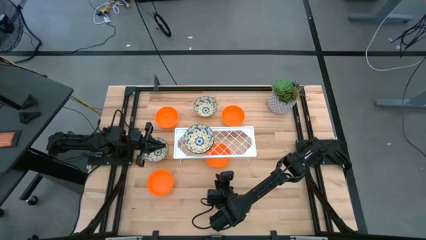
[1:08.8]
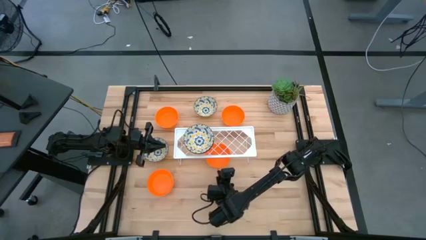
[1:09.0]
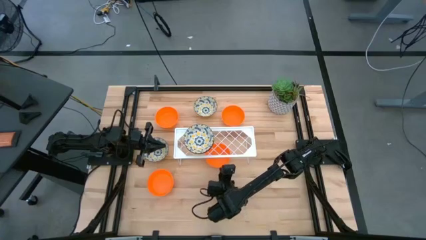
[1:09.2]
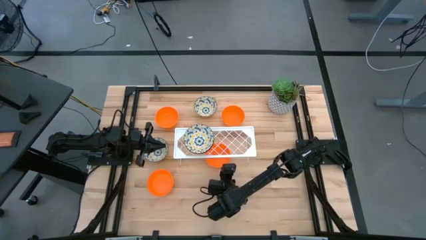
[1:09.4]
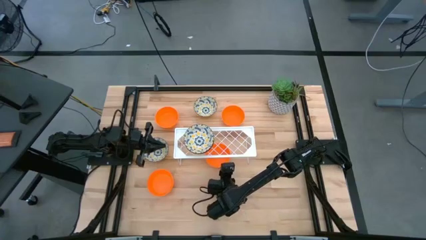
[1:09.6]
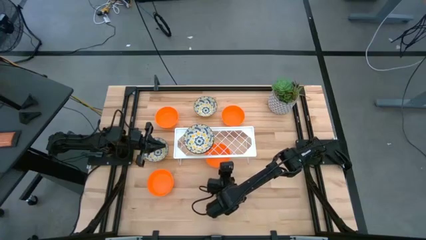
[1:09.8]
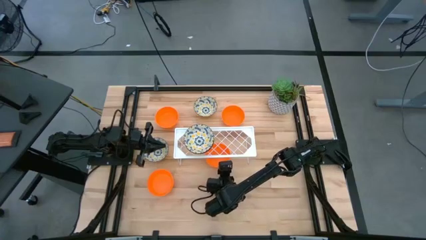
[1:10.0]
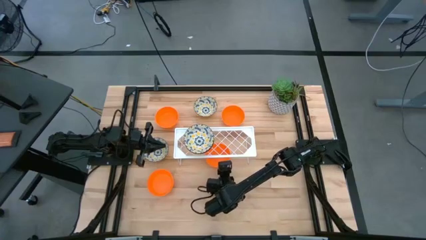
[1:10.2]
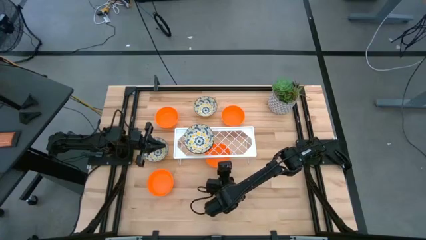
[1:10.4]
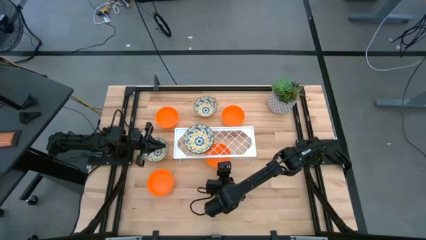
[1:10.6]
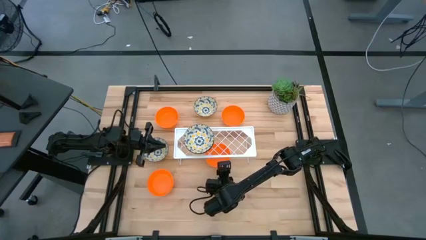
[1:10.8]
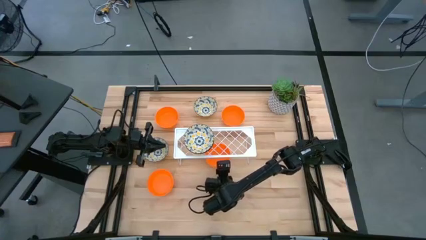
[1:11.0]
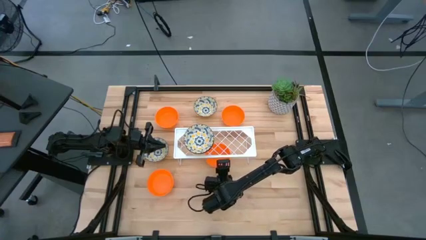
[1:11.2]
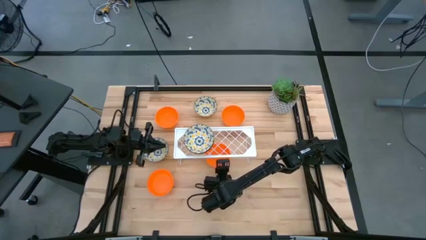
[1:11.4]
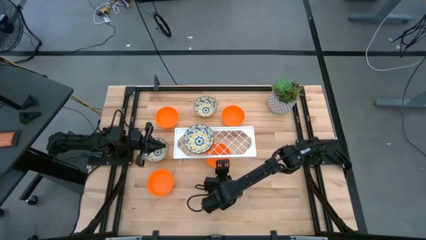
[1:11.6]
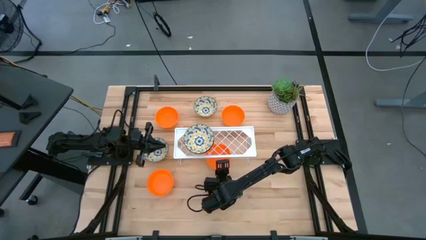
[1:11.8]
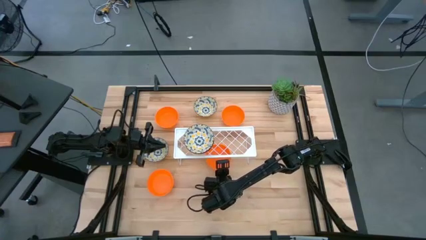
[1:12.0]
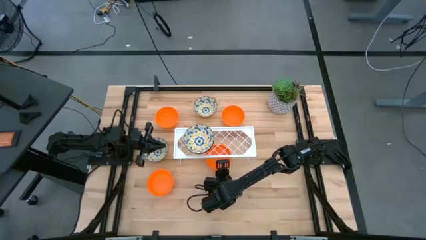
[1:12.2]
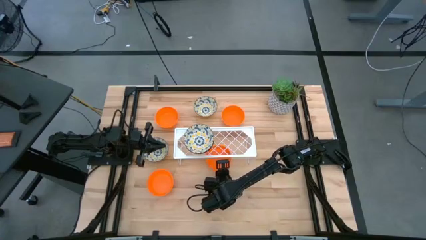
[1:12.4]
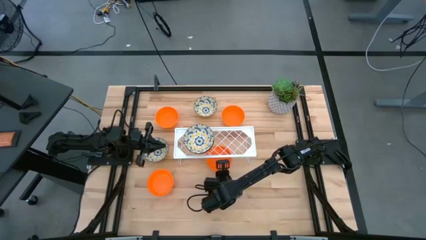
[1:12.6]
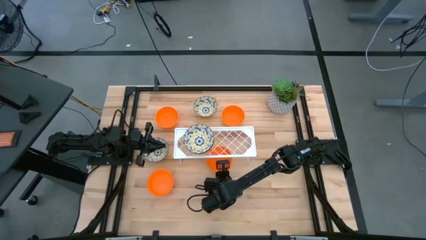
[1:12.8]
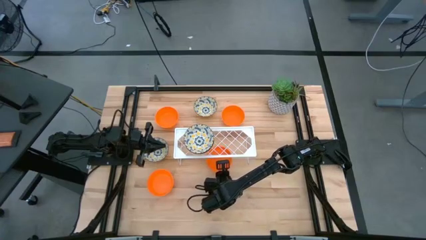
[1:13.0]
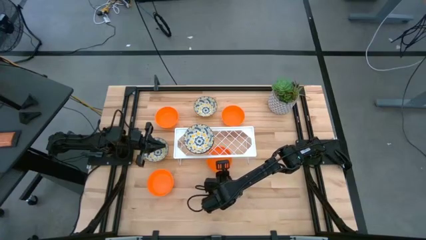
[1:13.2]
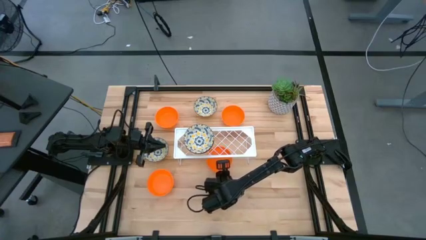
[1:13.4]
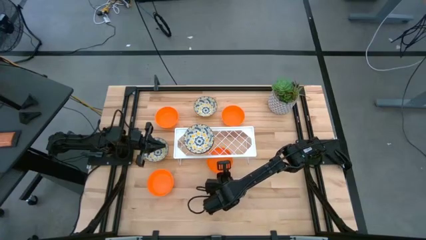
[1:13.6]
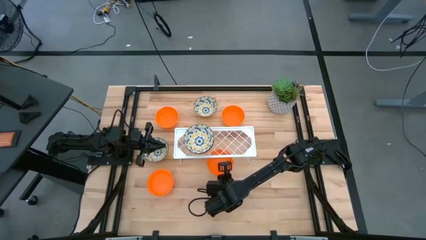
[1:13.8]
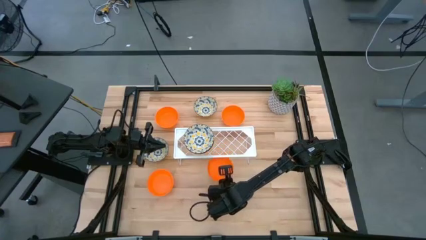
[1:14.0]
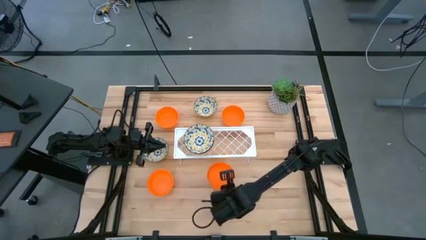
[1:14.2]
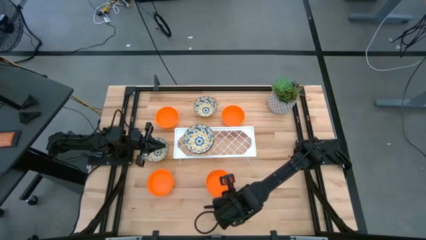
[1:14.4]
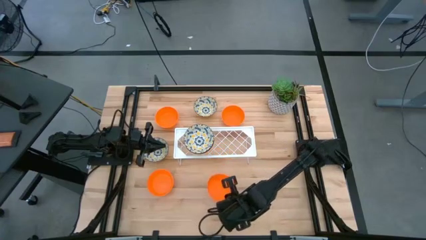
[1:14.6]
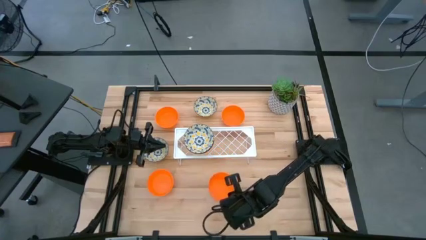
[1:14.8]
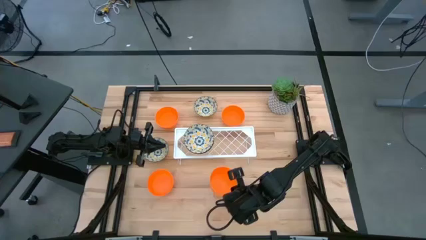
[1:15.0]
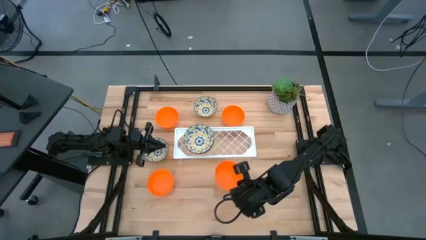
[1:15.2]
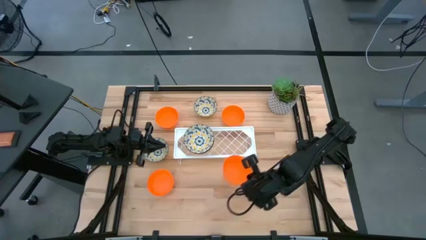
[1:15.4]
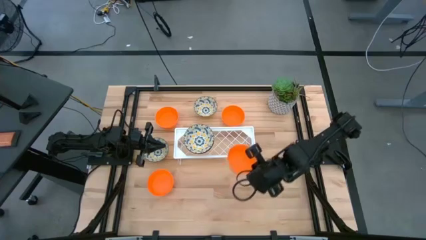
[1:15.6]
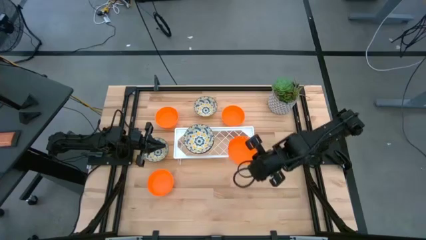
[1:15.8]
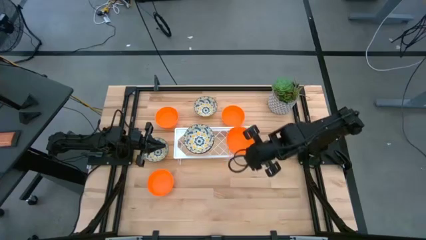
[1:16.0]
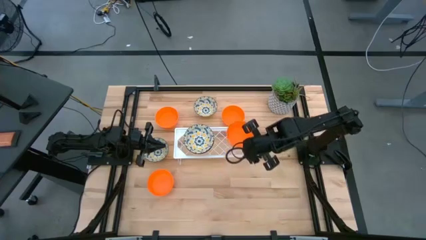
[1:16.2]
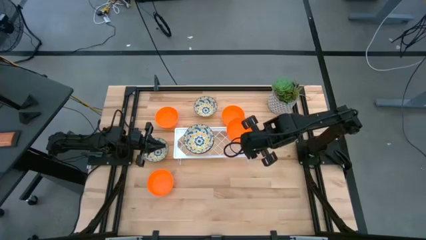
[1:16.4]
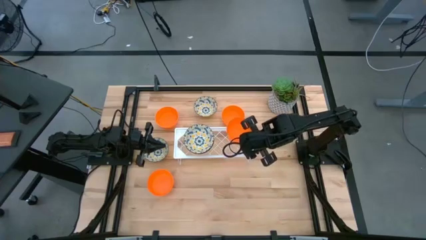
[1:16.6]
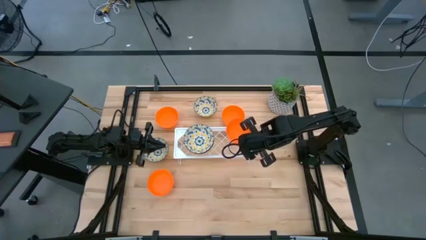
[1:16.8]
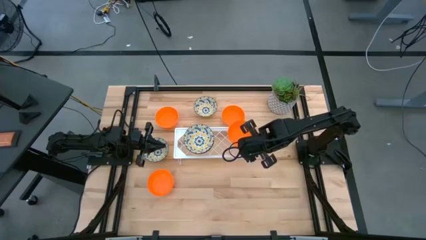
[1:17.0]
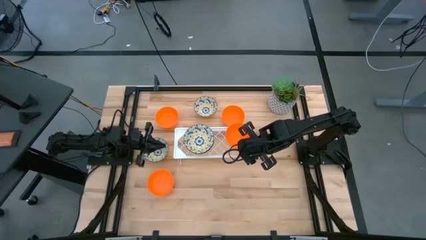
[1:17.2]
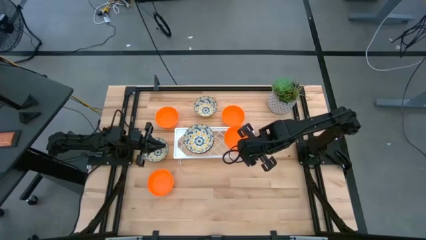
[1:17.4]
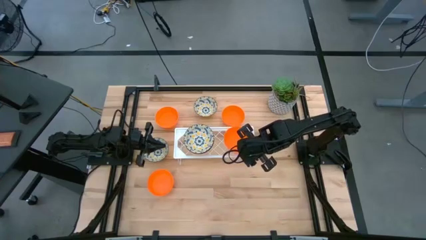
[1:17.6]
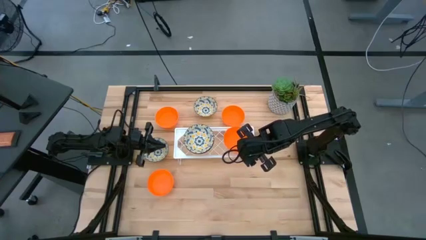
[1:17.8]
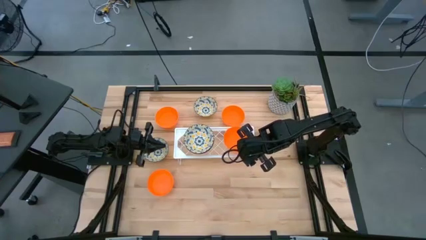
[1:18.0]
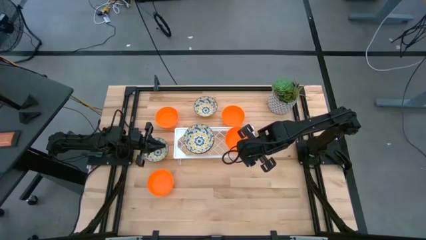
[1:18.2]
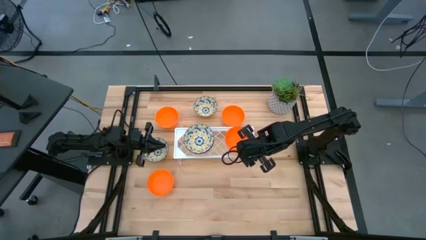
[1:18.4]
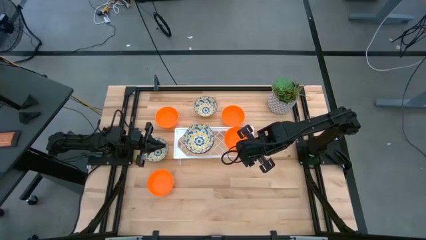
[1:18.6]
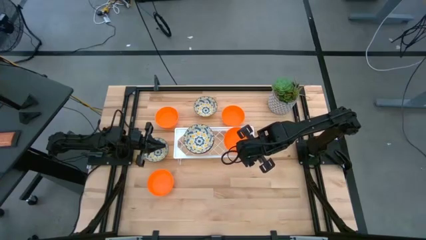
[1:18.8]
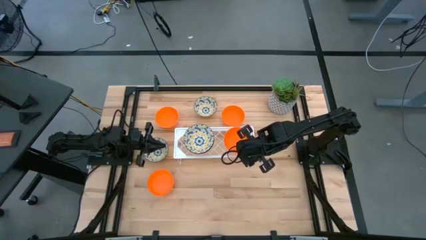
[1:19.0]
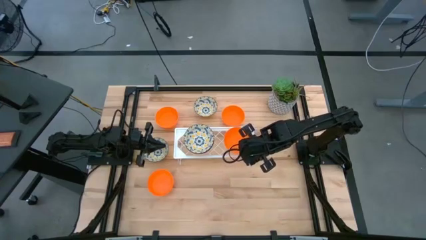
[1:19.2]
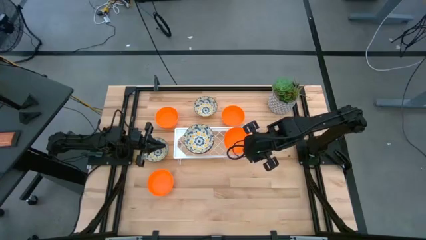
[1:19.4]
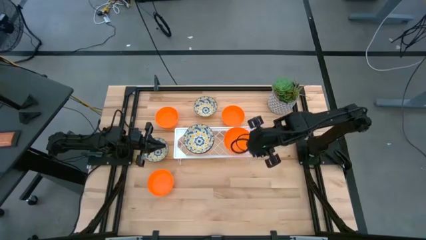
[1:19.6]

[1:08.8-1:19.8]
Task: Pick & Place Mini bowls
Put the orange bowl on the shelf

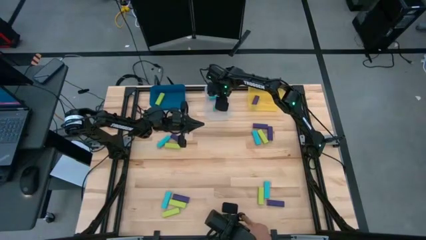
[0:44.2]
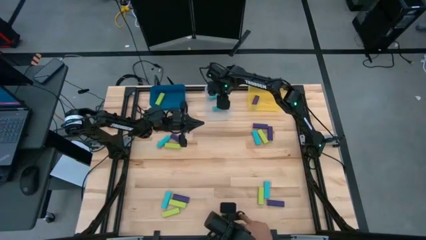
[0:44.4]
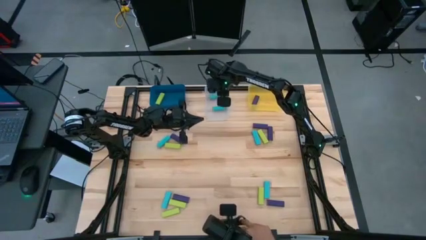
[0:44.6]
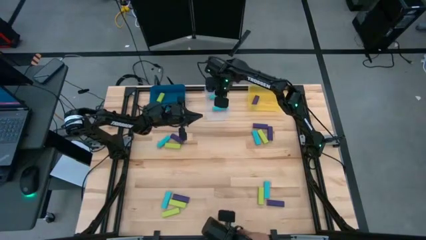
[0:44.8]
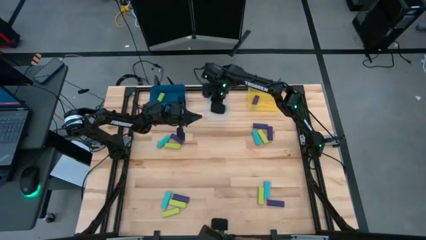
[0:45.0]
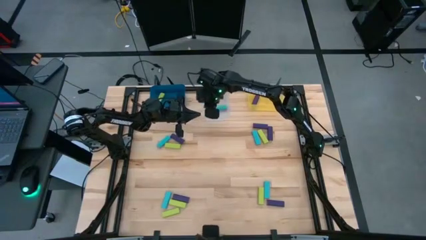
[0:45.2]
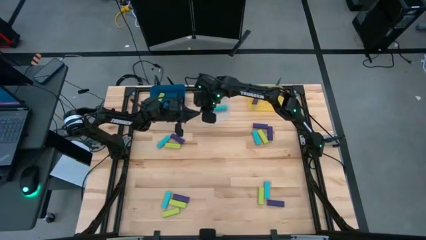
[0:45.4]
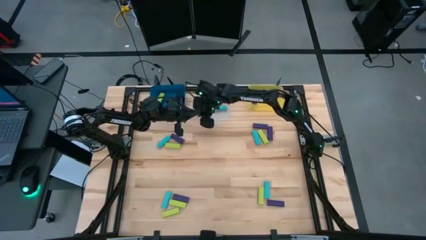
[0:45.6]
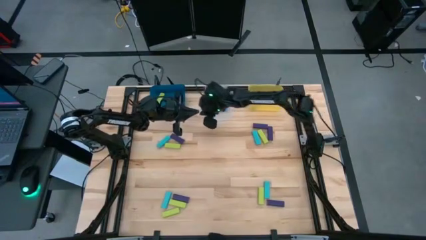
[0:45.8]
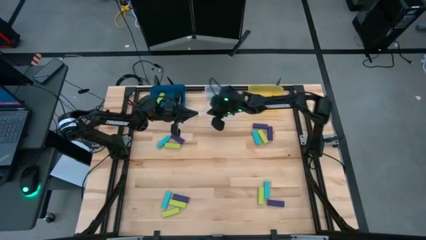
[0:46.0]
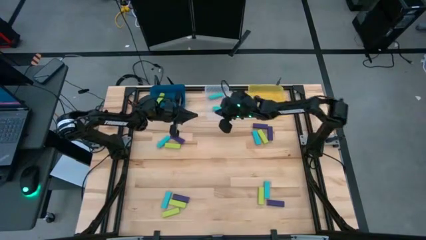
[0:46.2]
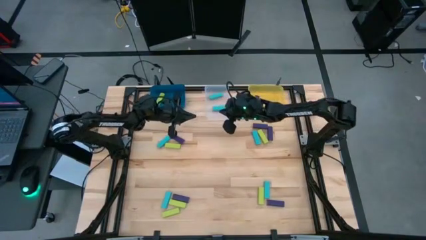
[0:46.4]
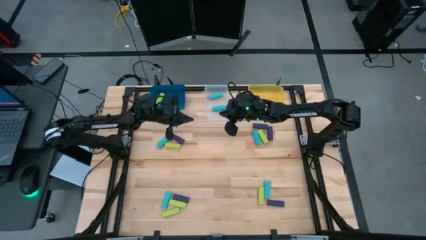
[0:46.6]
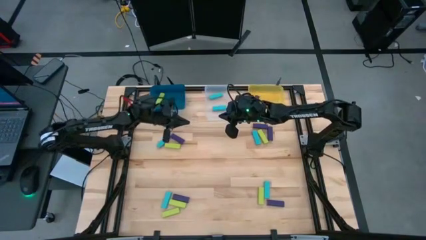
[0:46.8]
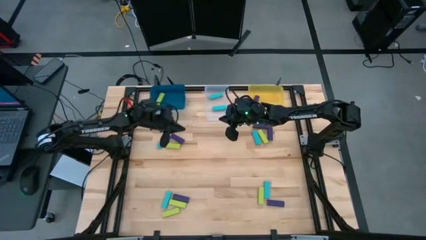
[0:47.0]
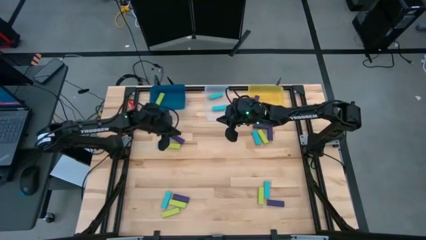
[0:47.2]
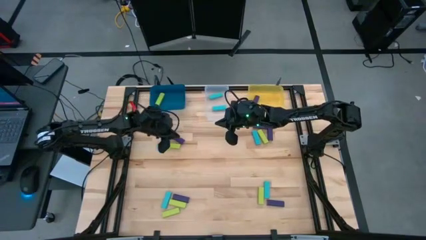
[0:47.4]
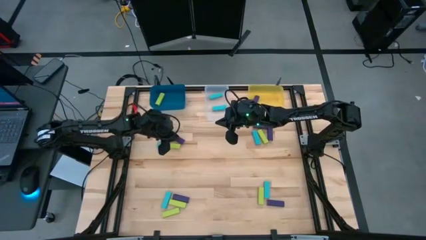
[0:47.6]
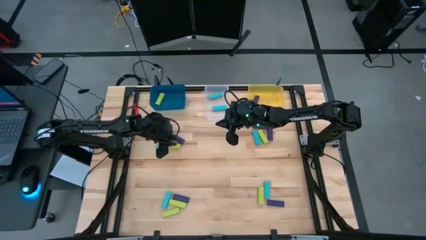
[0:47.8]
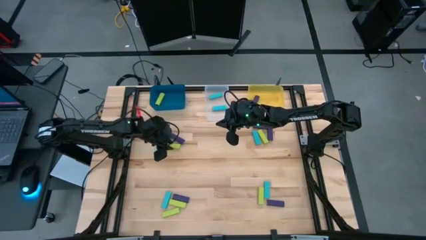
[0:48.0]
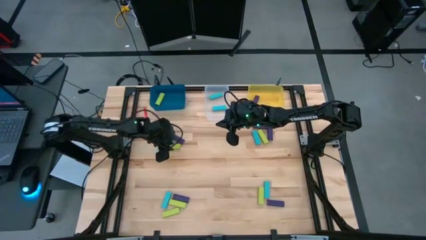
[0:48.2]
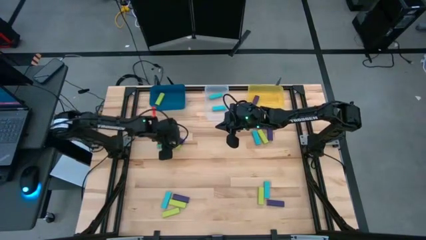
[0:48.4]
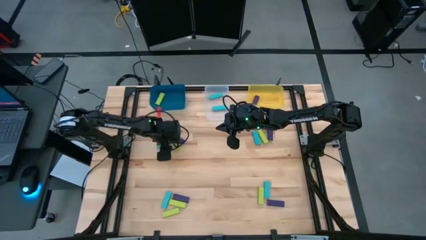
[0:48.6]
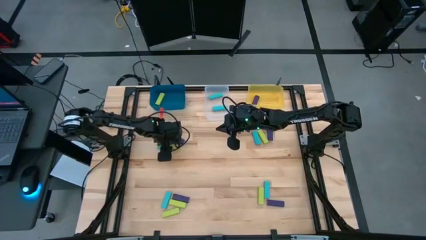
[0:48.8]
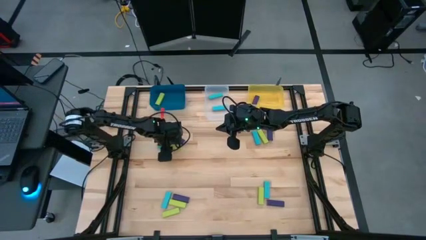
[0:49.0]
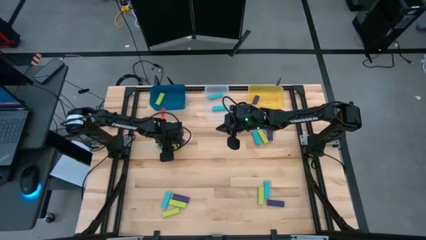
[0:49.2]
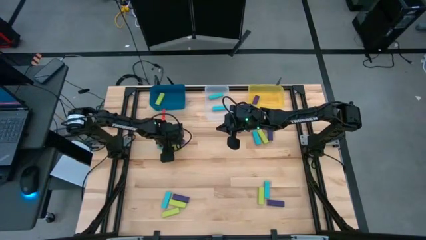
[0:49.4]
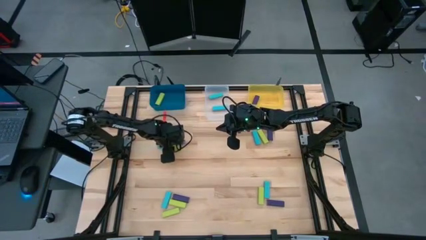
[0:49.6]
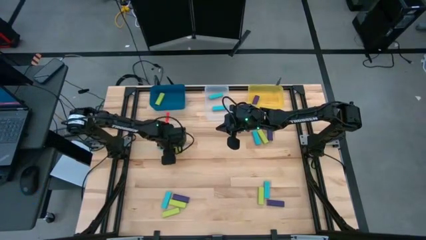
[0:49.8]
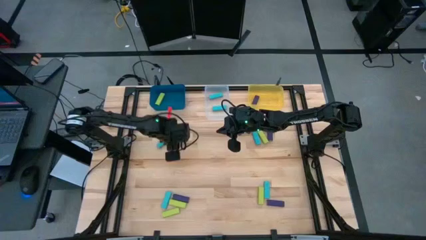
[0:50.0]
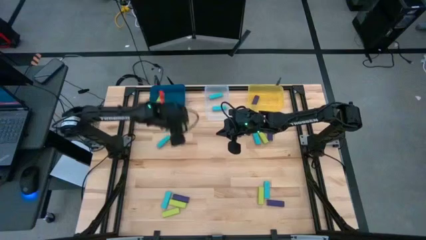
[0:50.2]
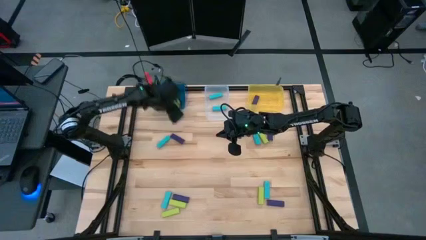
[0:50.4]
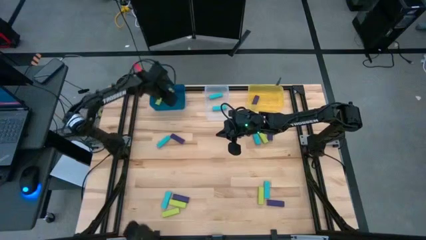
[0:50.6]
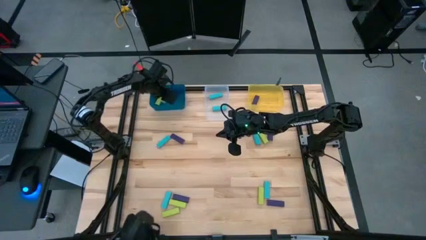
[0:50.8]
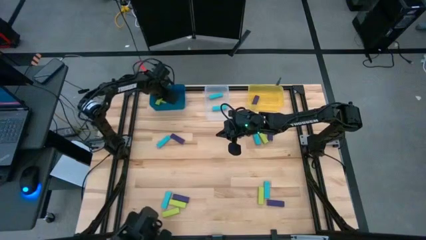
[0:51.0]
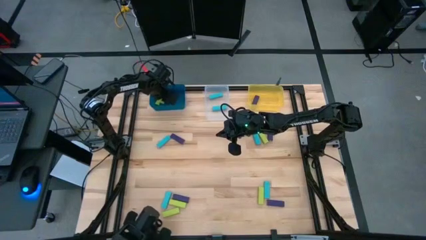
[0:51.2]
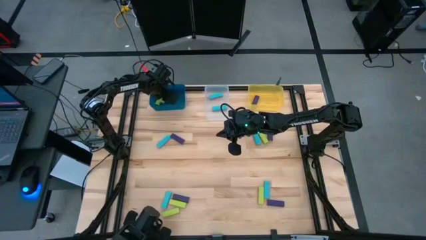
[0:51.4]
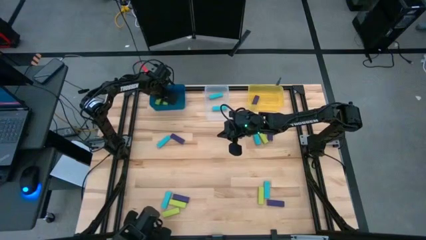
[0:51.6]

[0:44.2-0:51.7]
Task: Sort blocks
Put the green block into the blue bin
